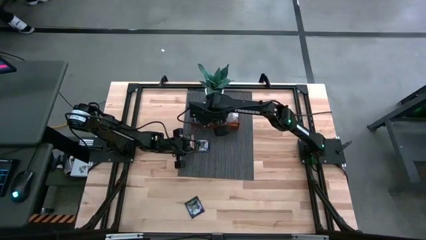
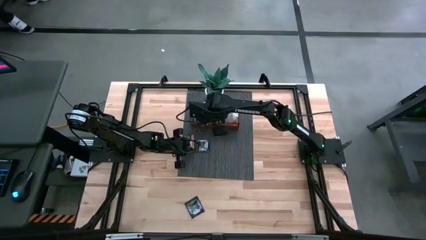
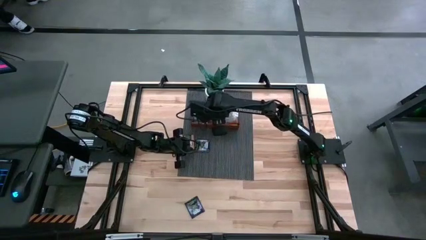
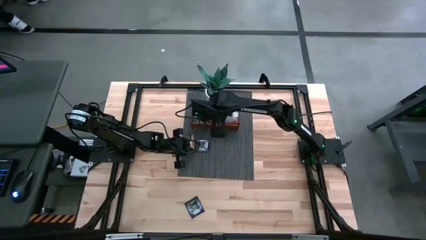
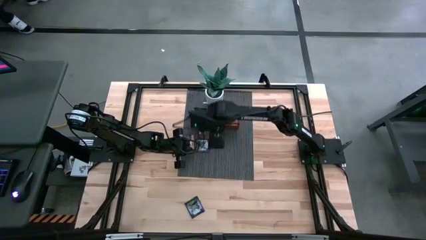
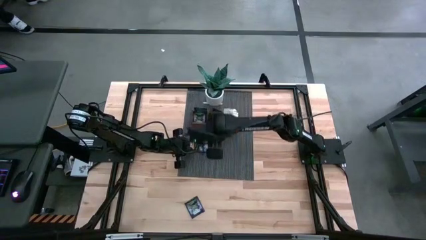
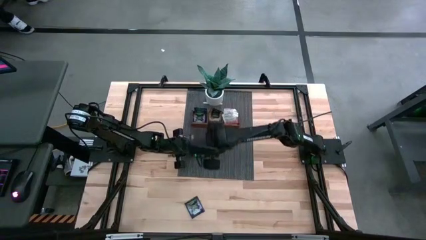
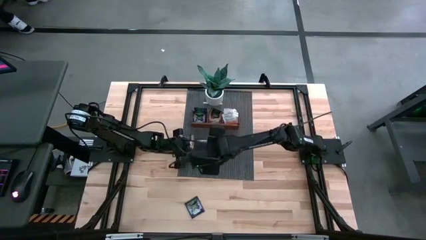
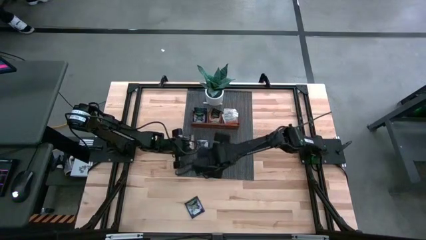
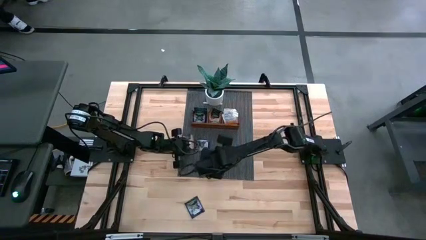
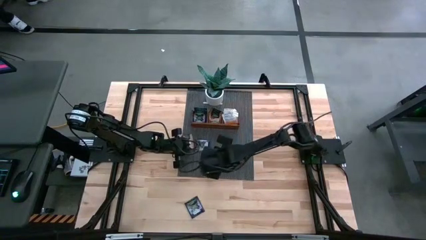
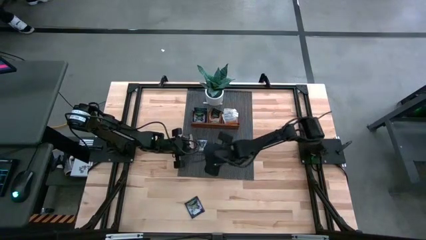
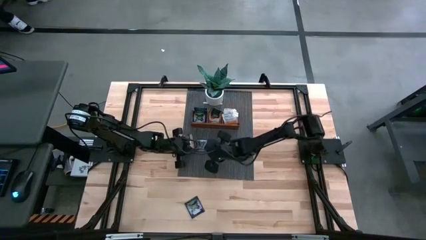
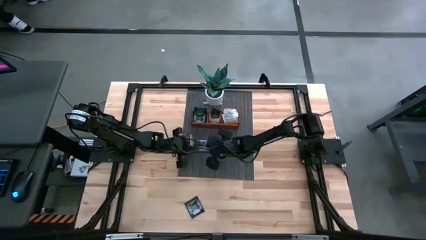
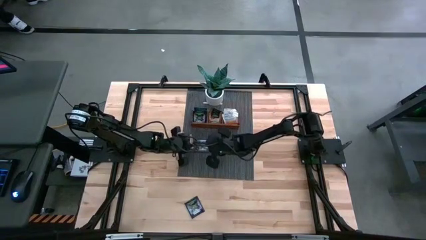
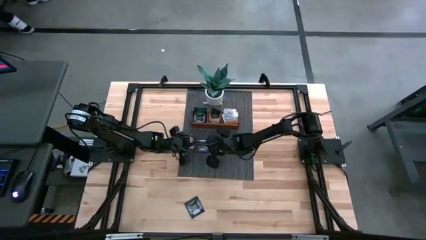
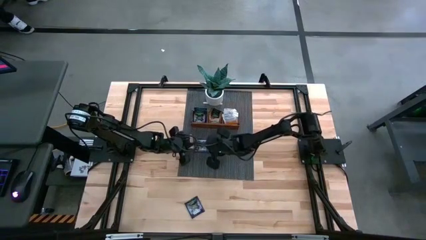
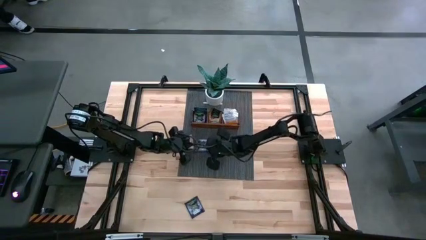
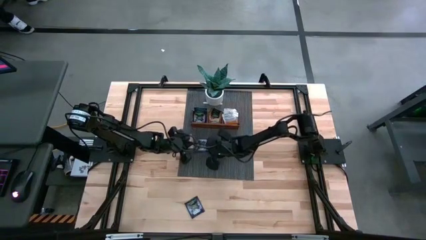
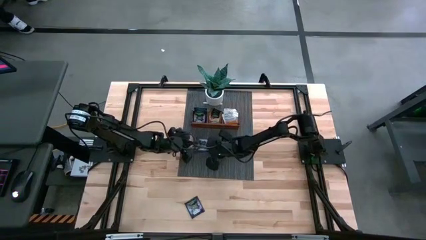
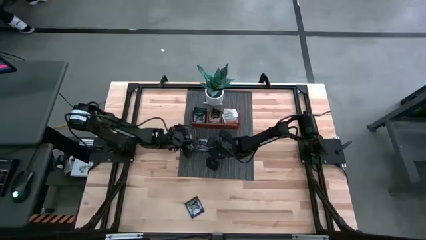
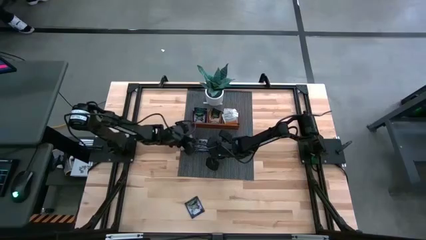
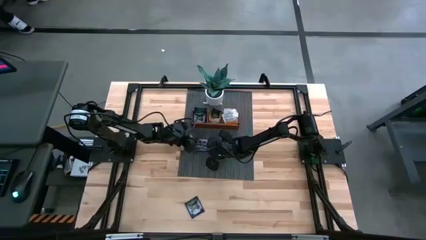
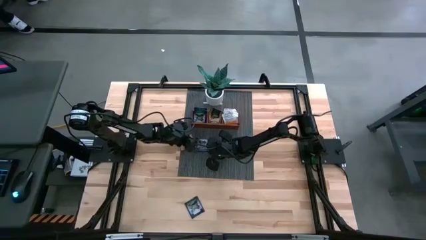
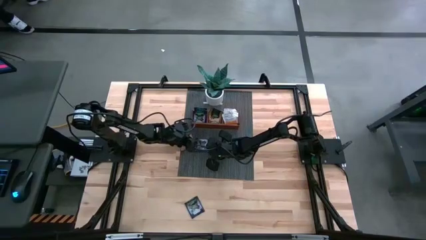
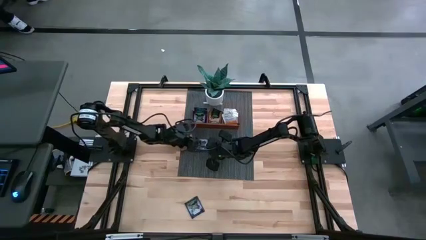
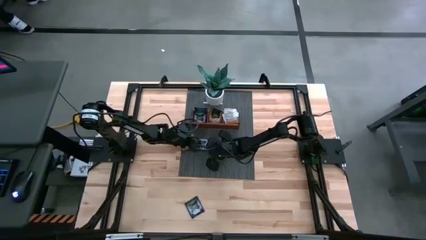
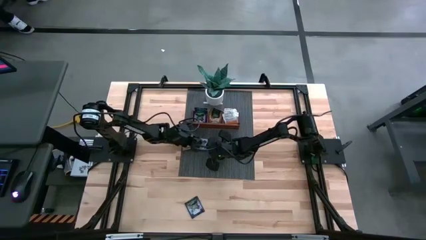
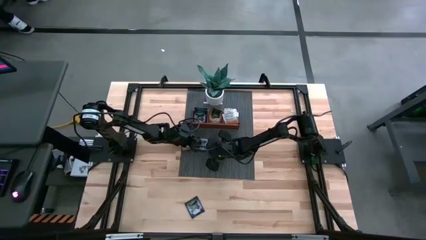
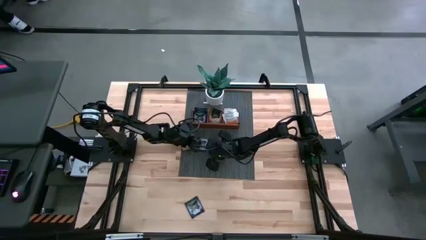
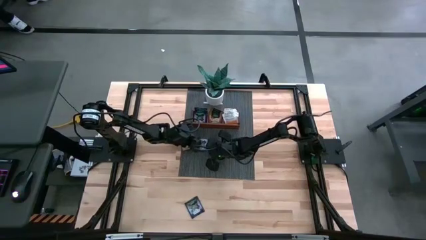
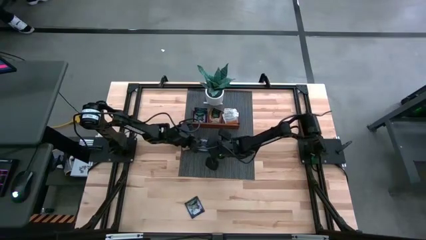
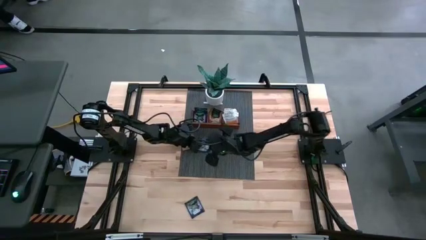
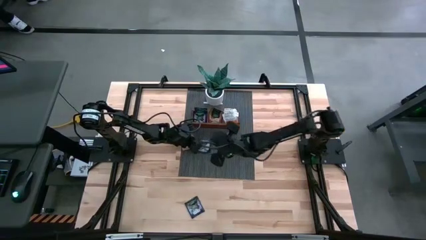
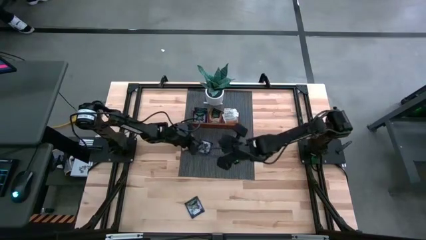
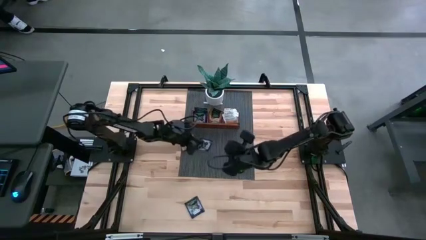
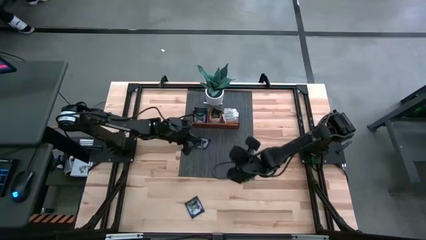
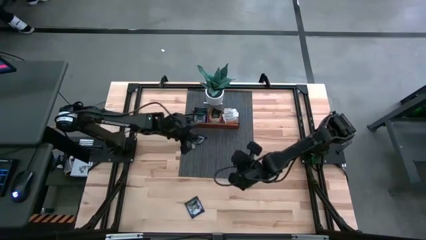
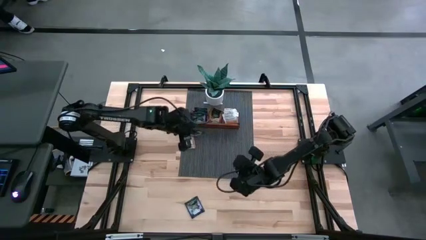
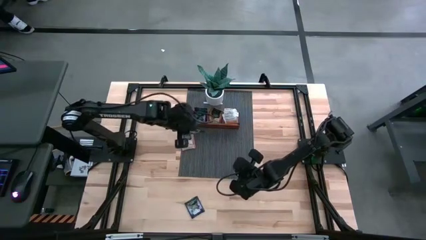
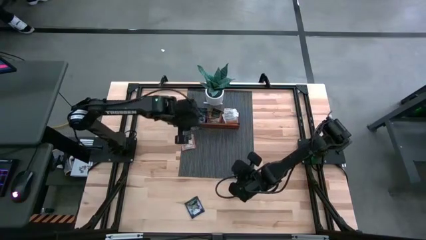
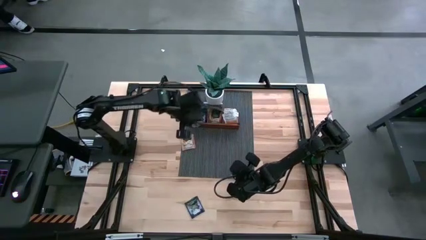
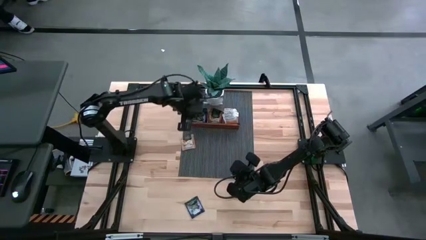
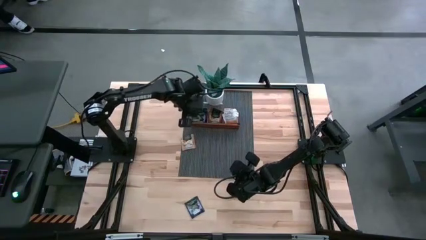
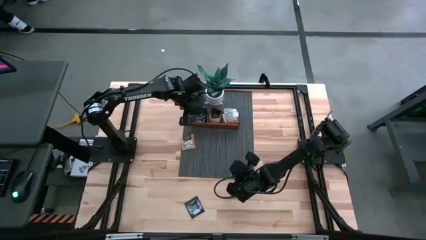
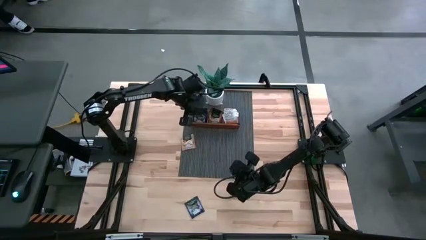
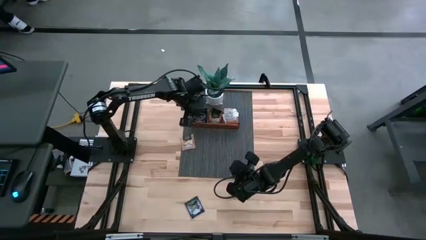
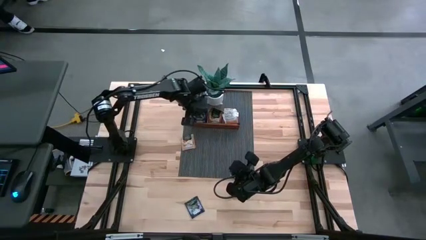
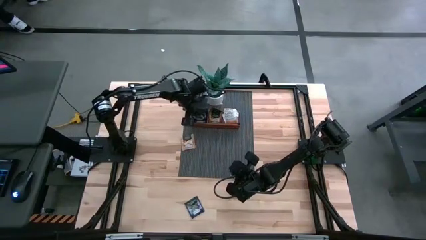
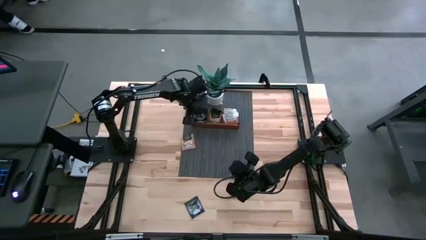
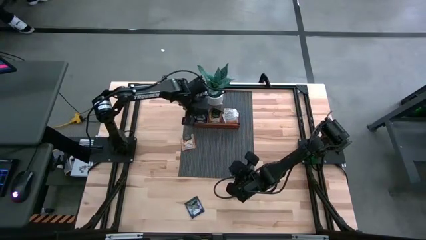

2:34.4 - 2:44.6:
Task: Pick & Place Tea
Put the purple tea bag into the left section of the wooden organizer

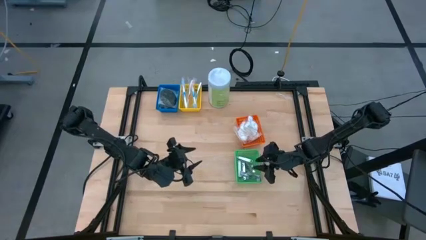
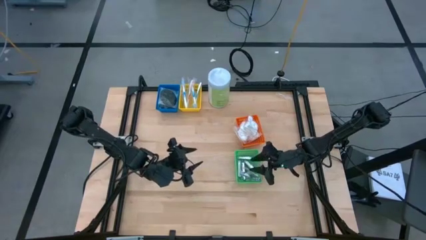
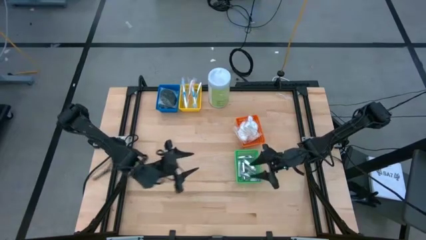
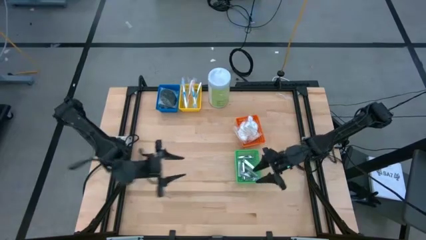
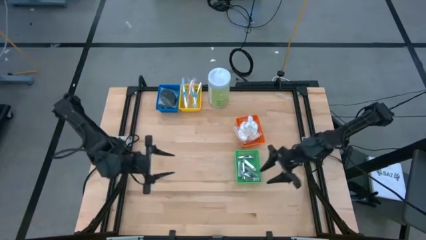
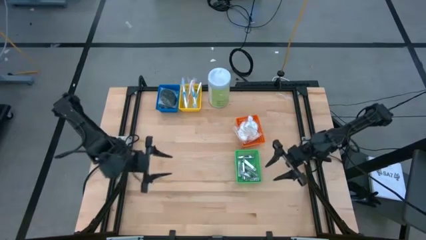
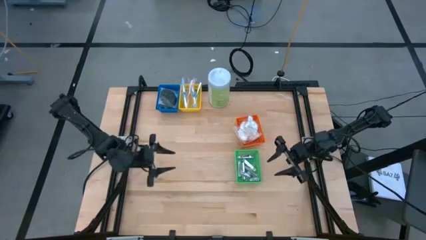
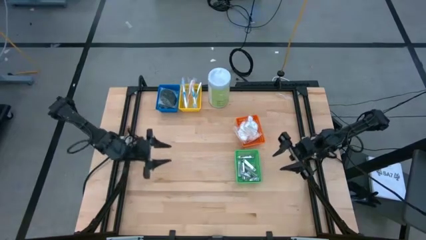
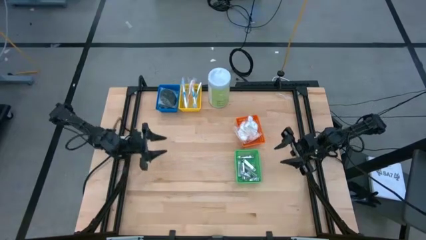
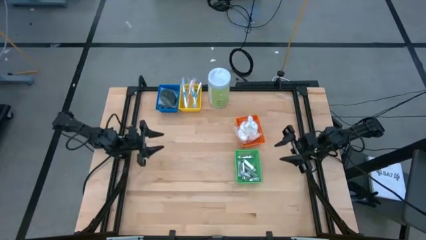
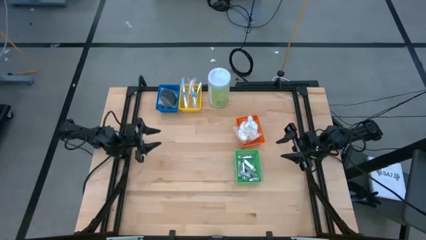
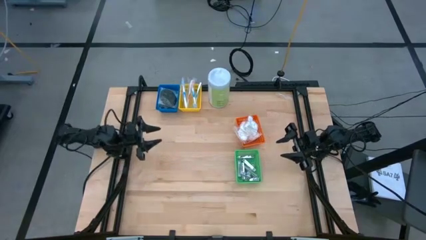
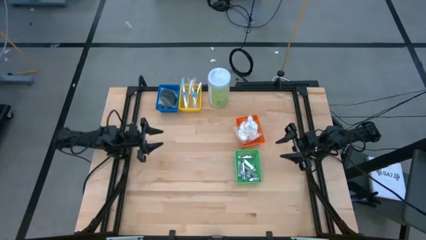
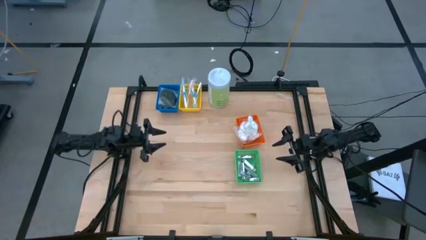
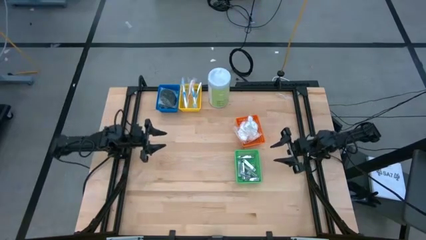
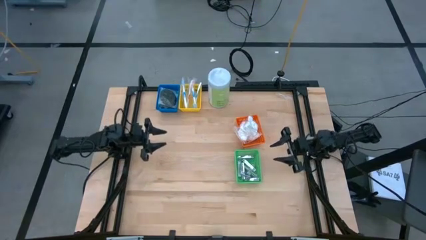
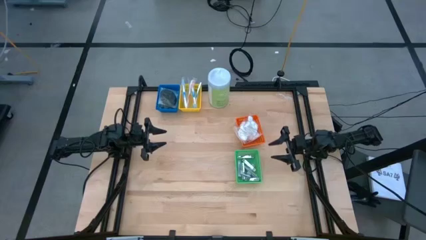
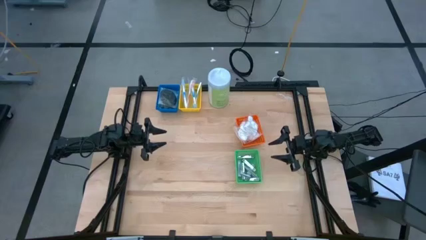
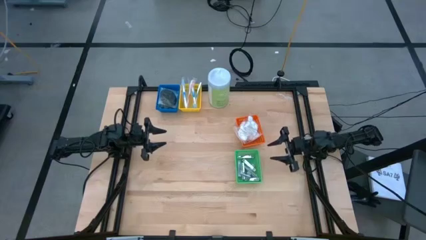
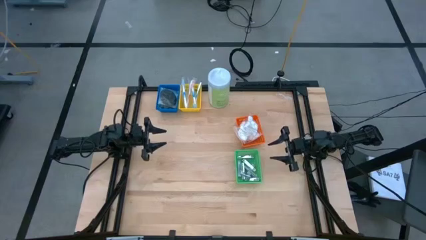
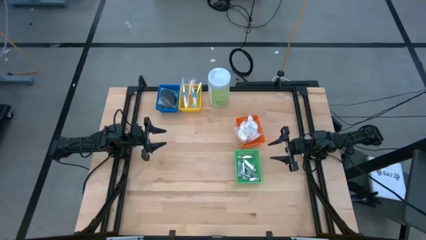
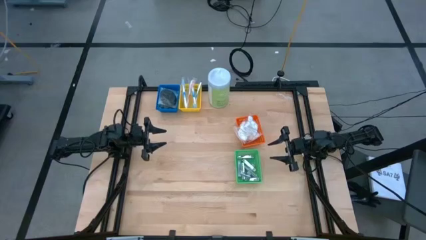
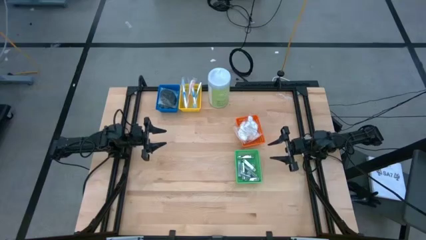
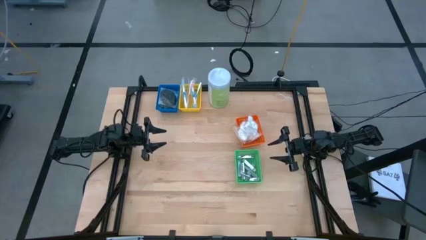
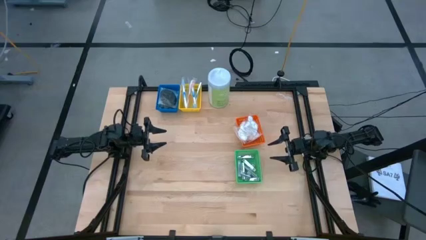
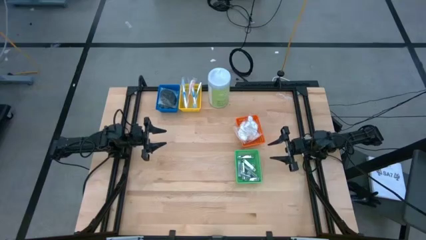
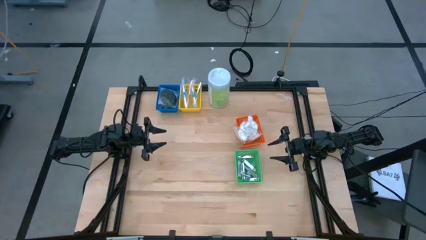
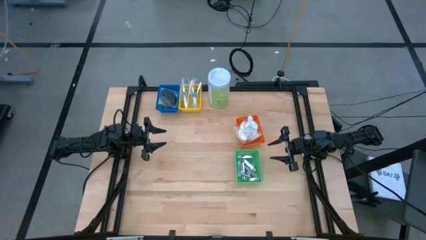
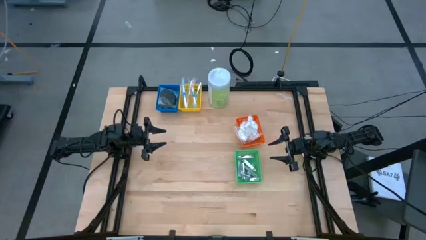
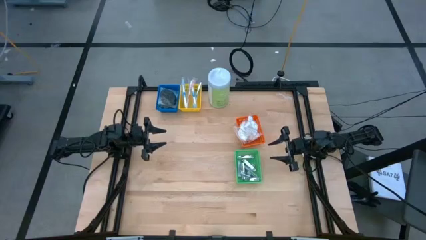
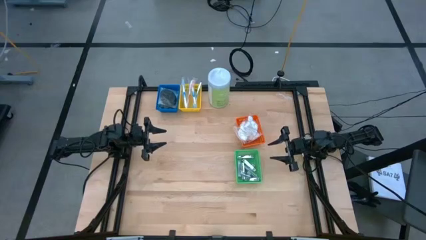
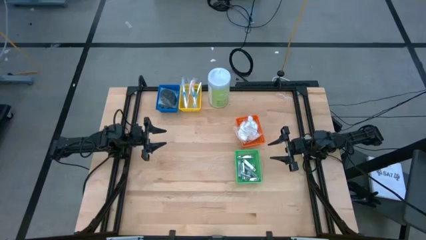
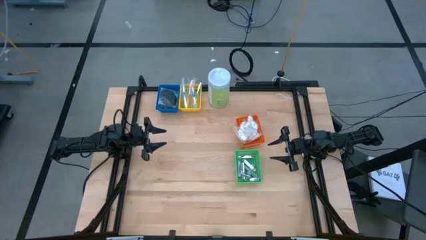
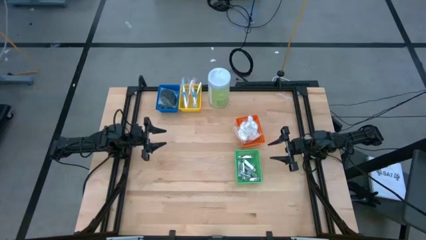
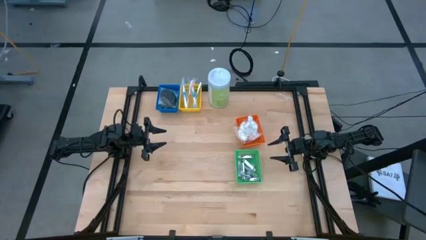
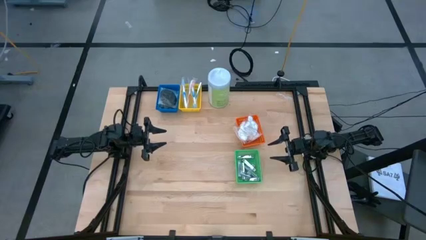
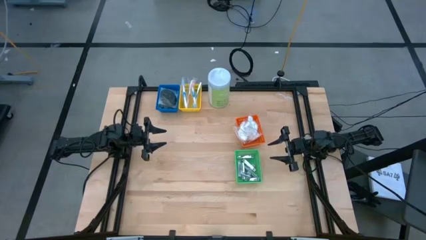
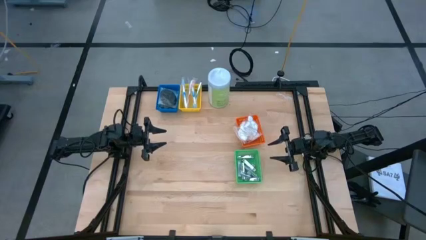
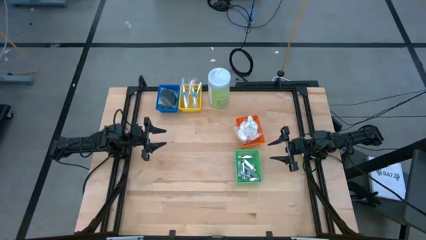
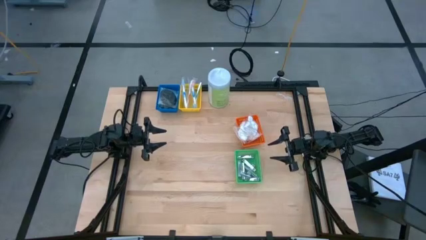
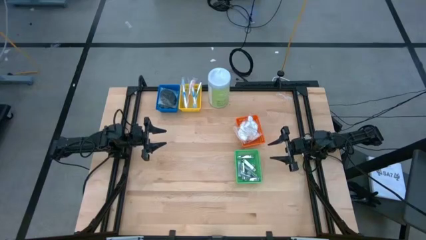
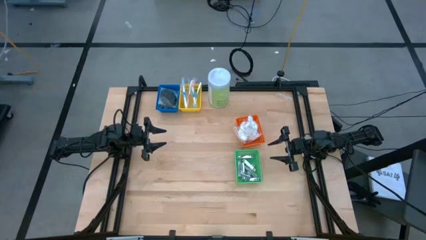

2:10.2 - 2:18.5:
Task: Pick & Place Travel size toiletries
Return to Home Position
